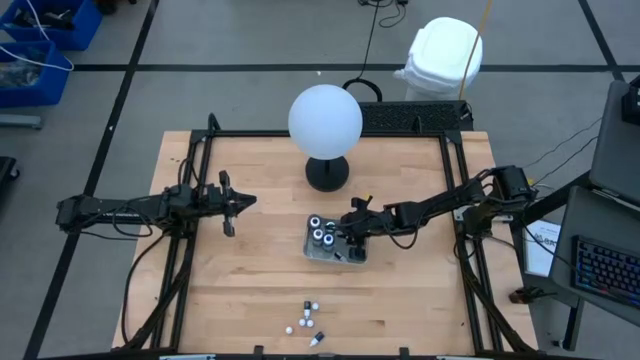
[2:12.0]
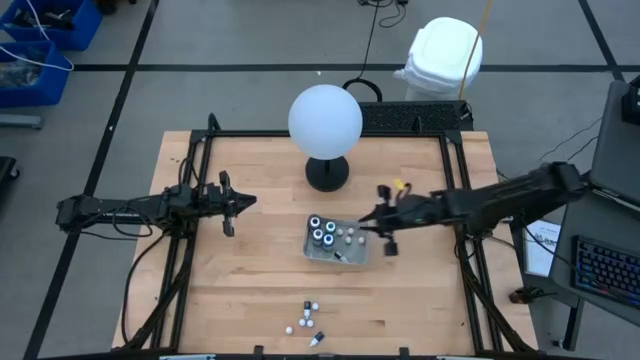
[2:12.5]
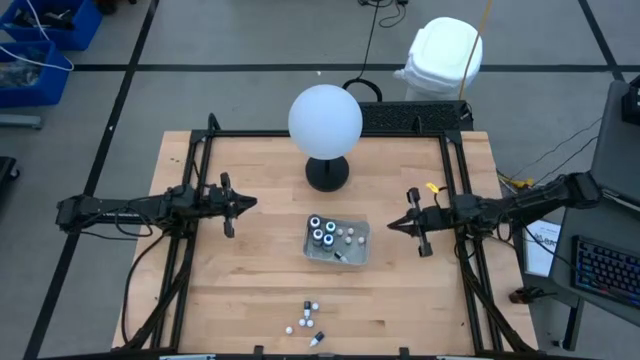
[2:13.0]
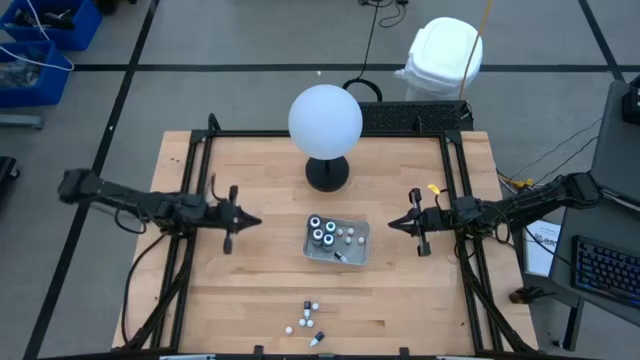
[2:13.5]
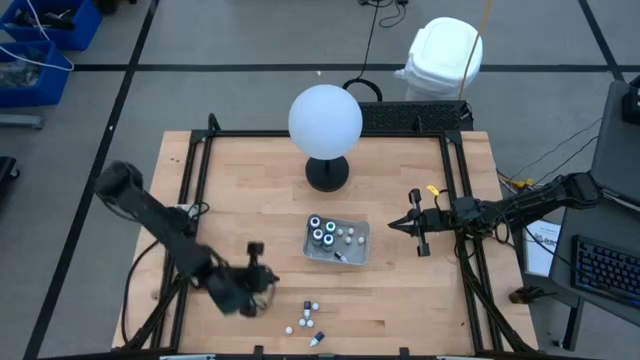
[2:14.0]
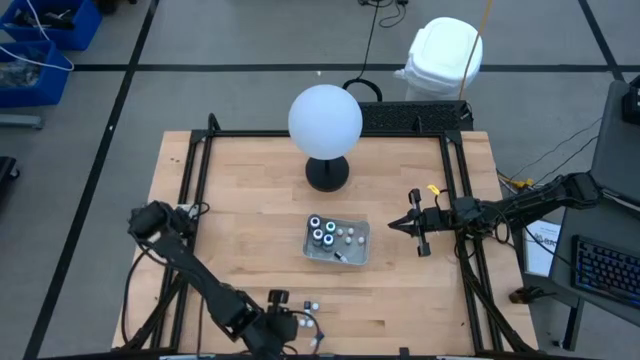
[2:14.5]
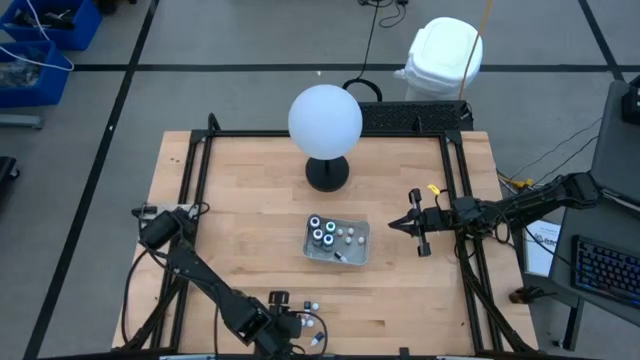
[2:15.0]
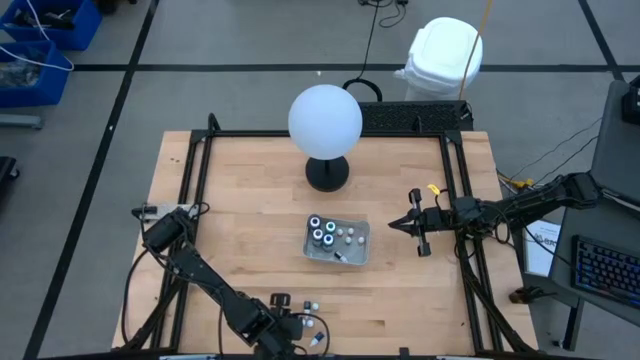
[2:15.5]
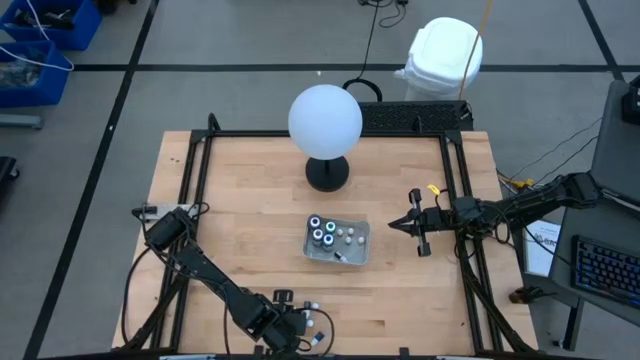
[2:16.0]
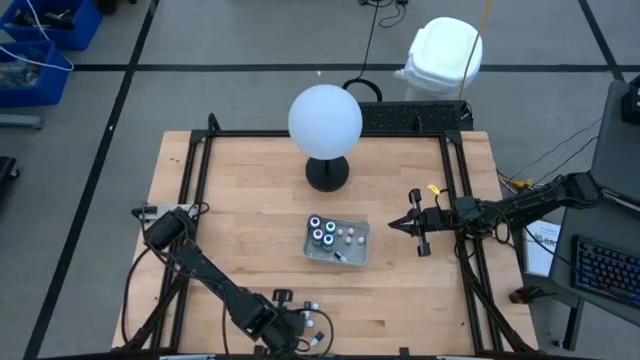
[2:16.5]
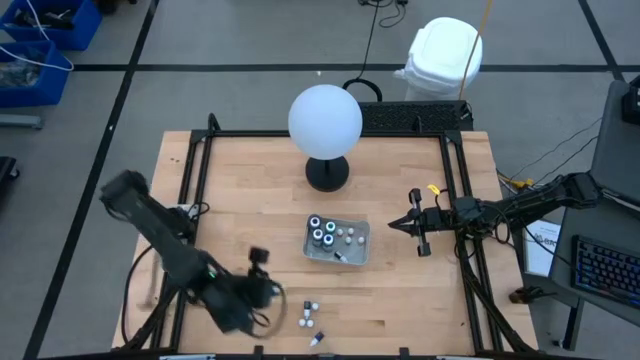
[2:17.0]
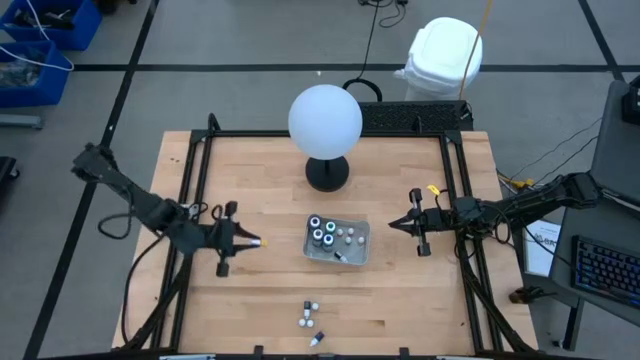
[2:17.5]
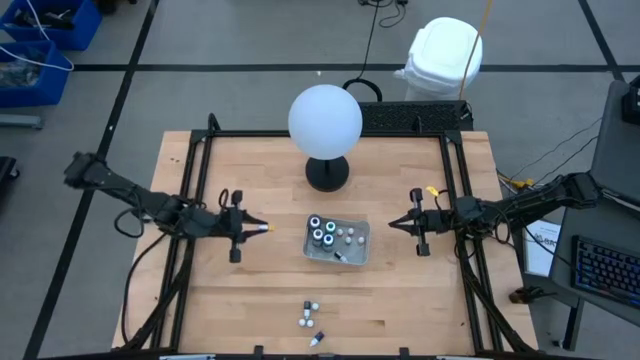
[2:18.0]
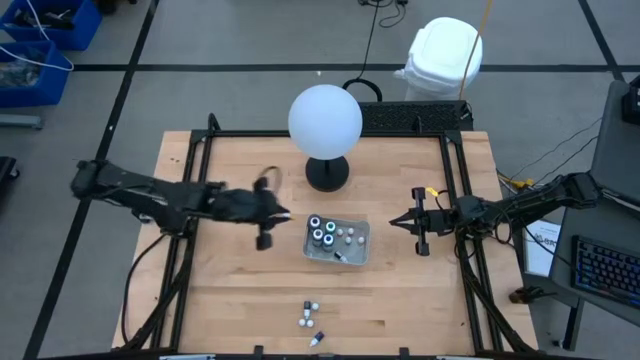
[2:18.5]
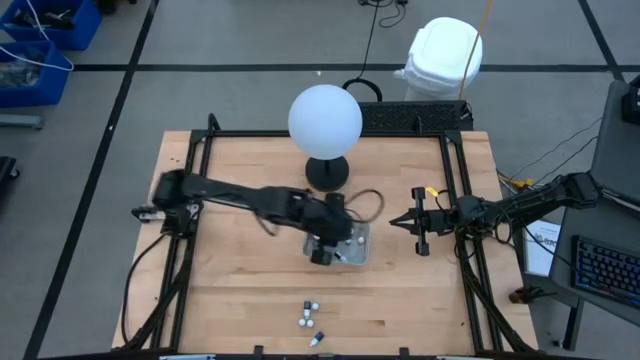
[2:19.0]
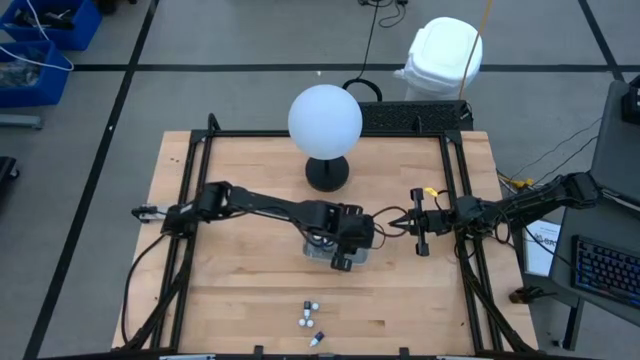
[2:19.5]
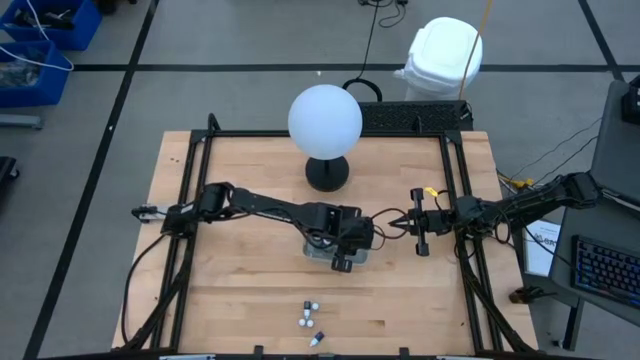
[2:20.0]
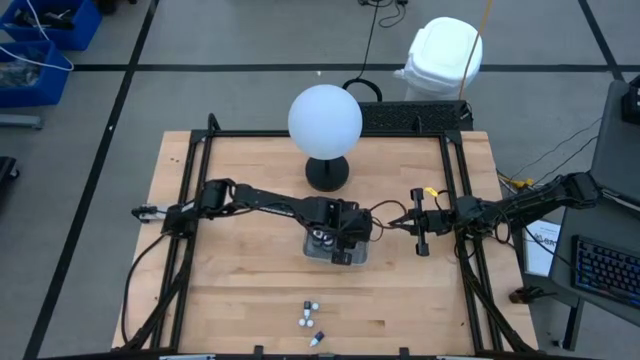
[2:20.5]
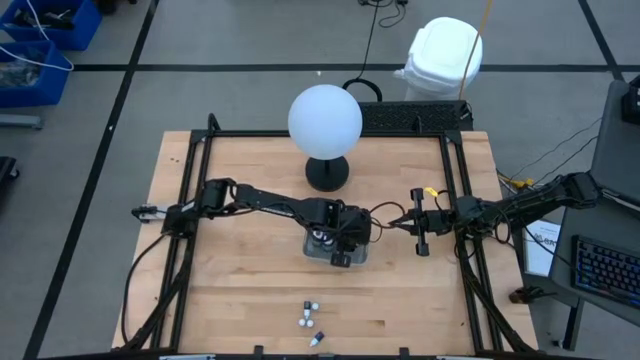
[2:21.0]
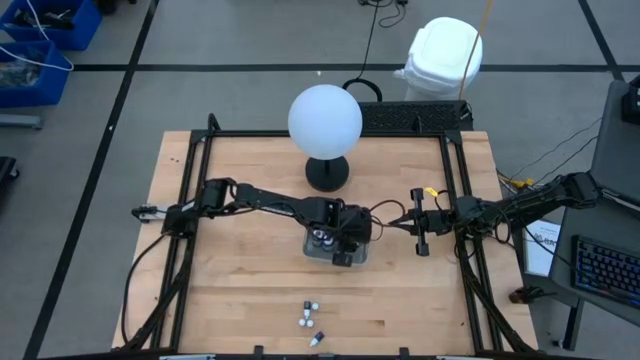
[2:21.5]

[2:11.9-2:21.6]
Task: Pick & Place food coloring
Put the small orange food coloring bottle into the gray bin

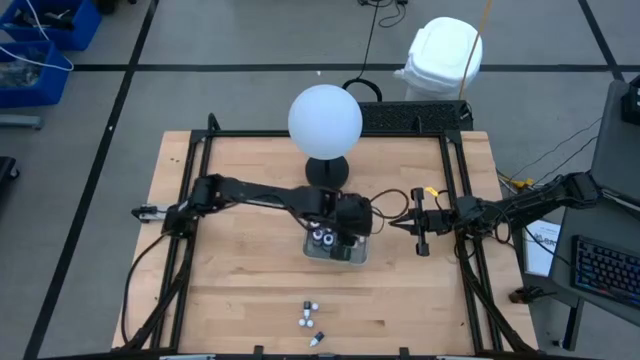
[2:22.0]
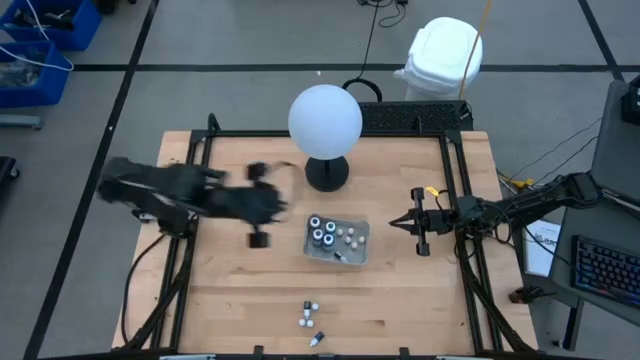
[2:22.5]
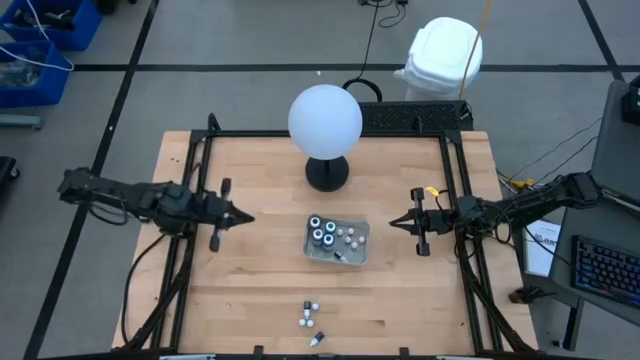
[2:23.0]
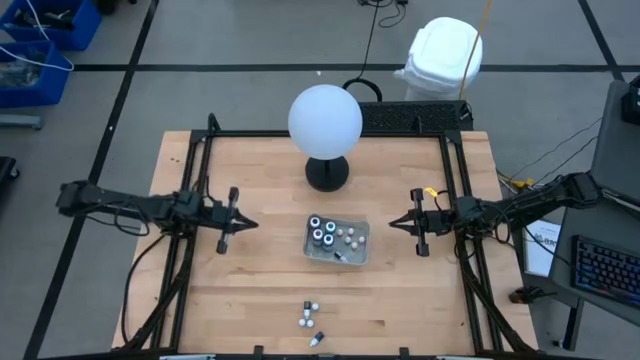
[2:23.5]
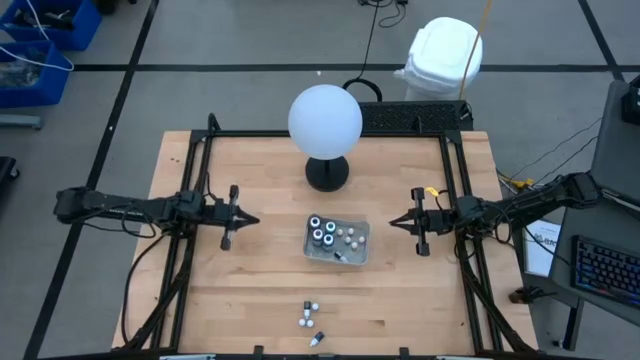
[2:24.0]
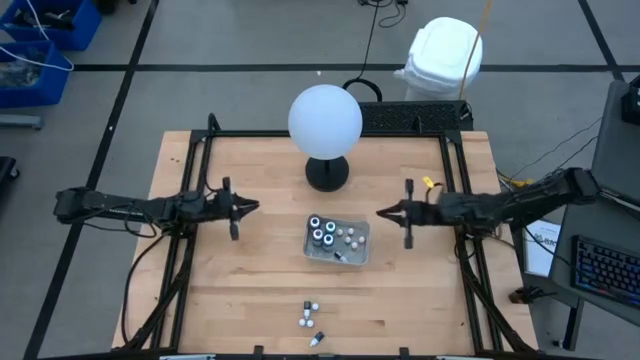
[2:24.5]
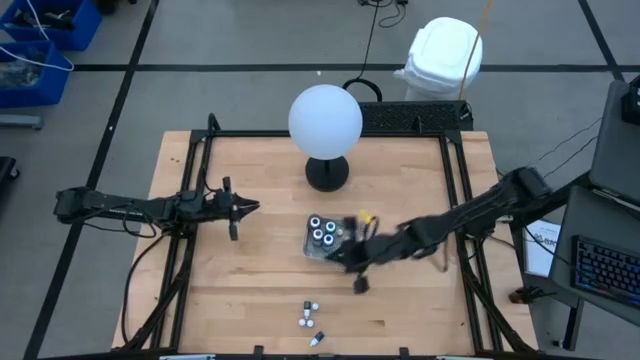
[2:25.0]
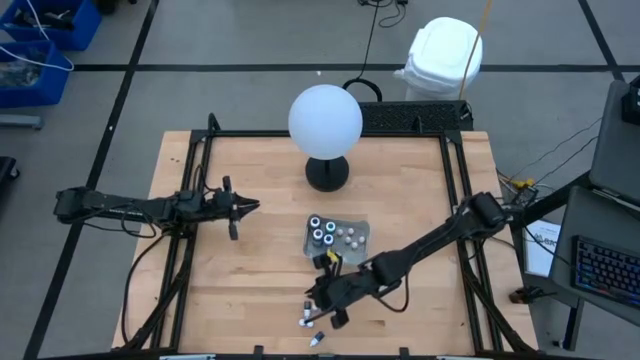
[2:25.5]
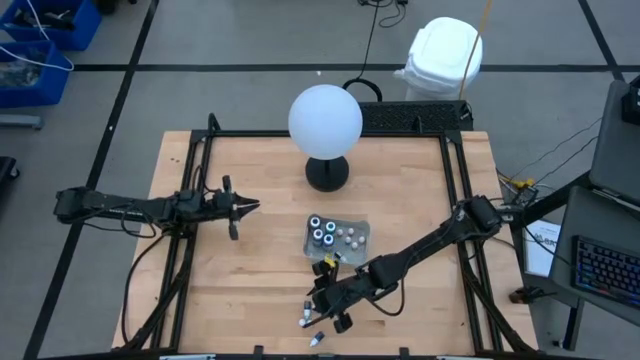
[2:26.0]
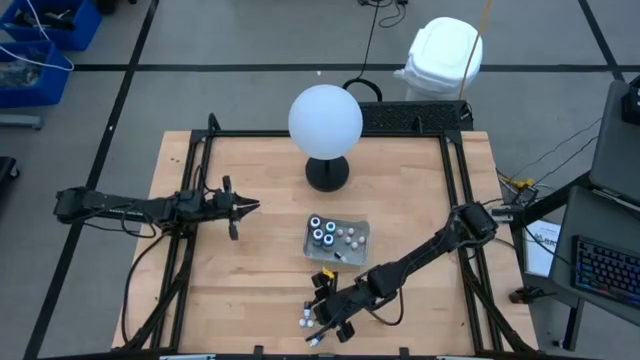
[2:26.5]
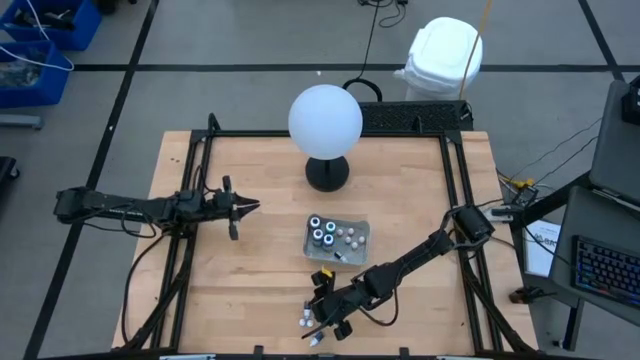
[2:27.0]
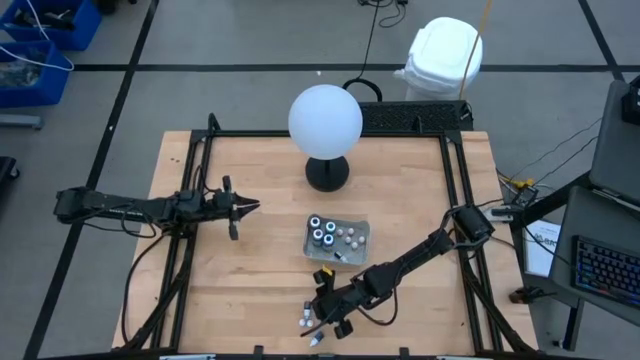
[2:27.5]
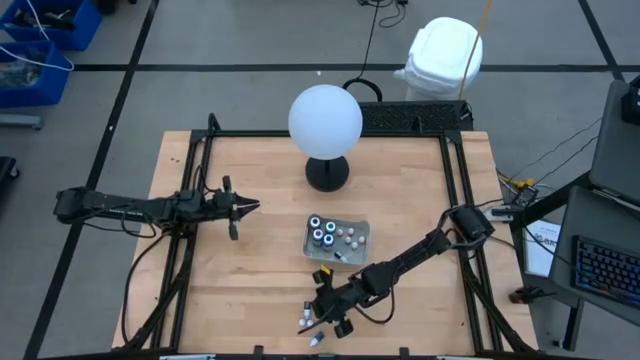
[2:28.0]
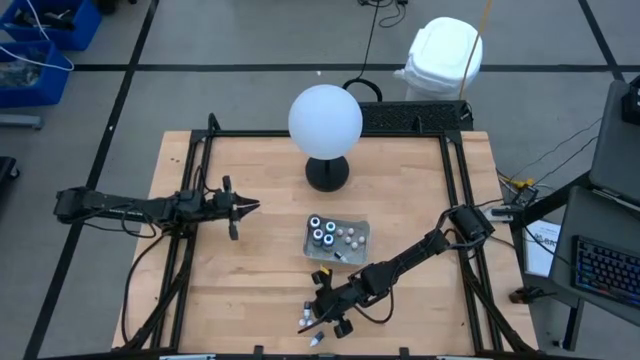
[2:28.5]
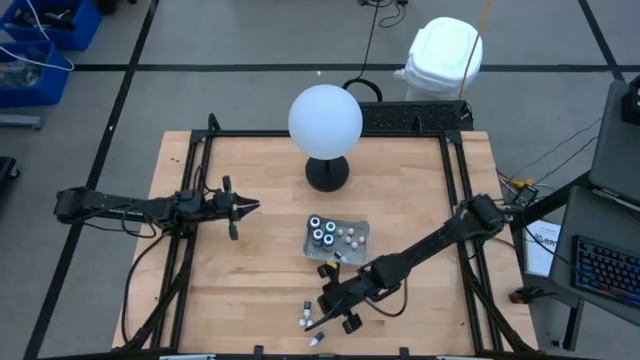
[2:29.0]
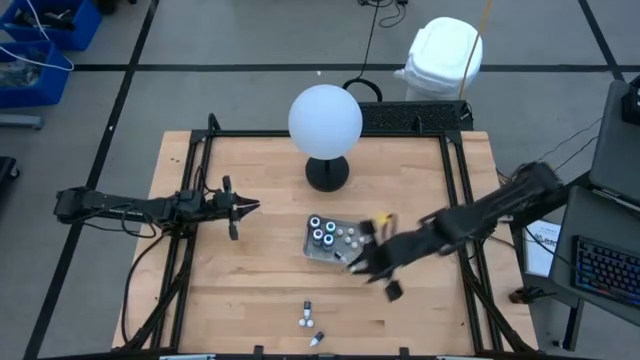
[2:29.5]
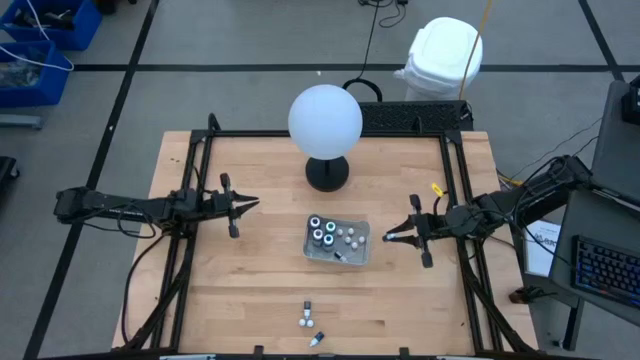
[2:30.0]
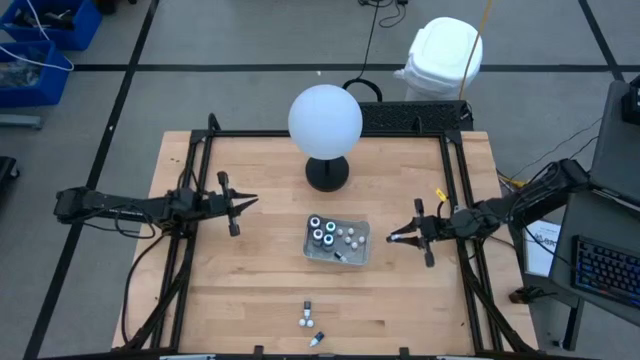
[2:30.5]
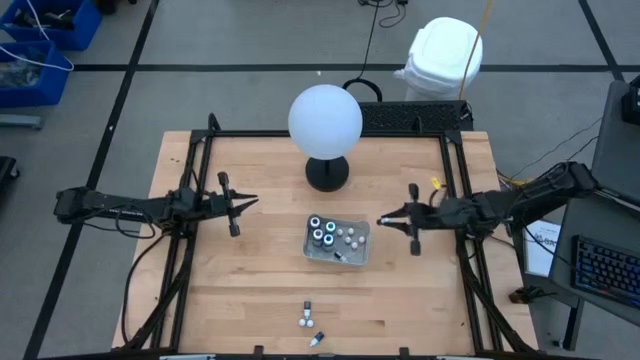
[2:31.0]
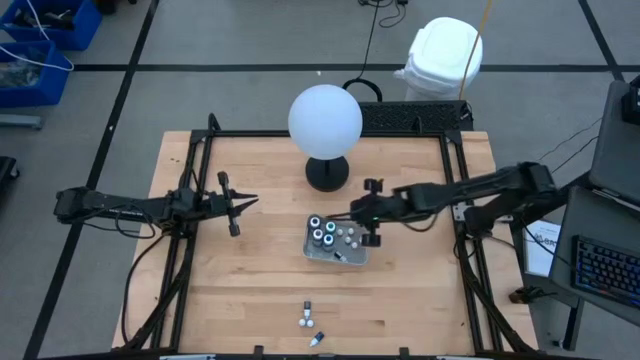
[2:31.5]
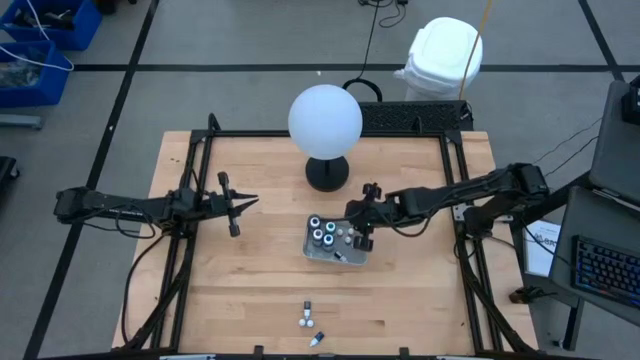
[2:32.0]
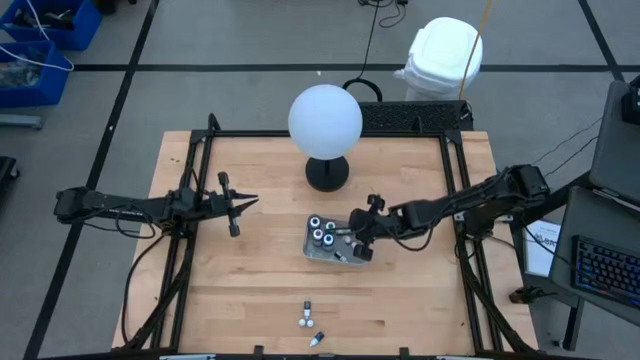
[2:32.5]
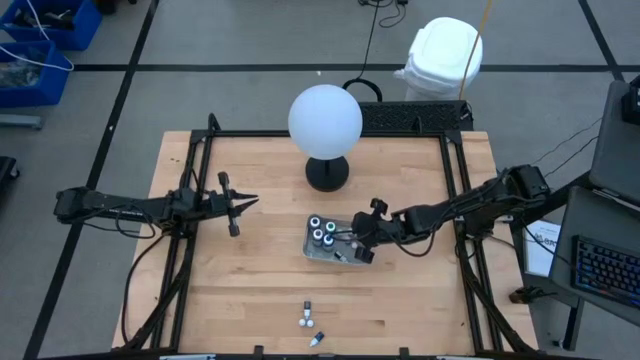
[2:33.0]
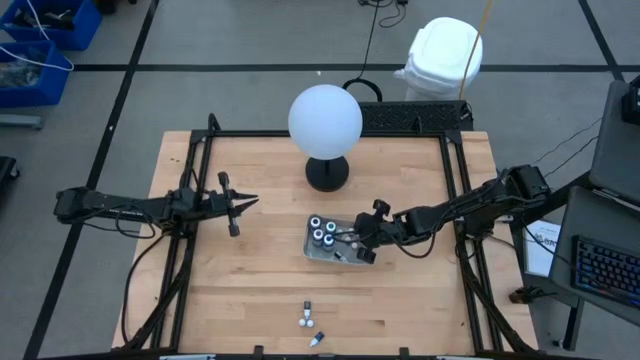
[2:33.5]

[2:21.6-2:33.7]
Put the small blue food coloring bottle into the gray bin
